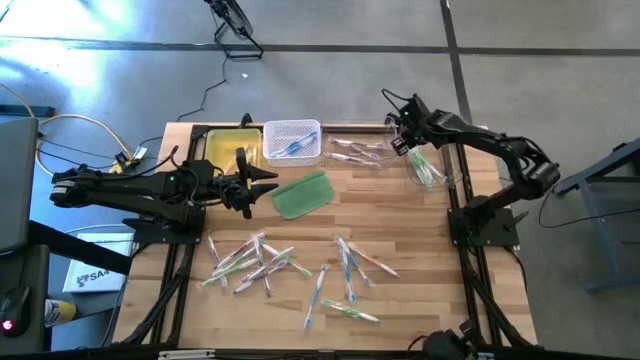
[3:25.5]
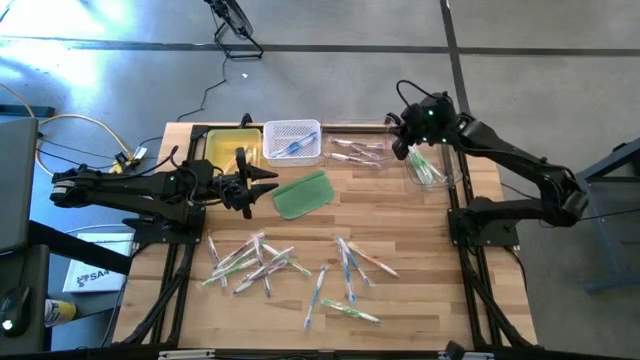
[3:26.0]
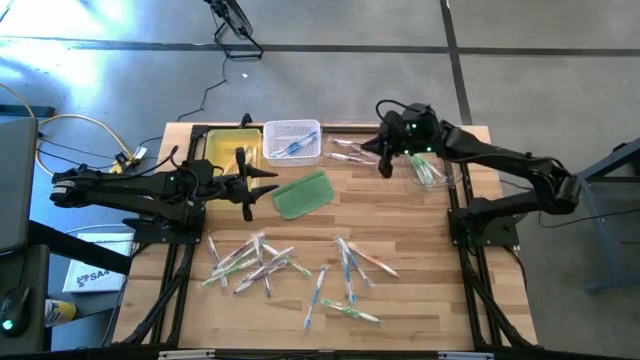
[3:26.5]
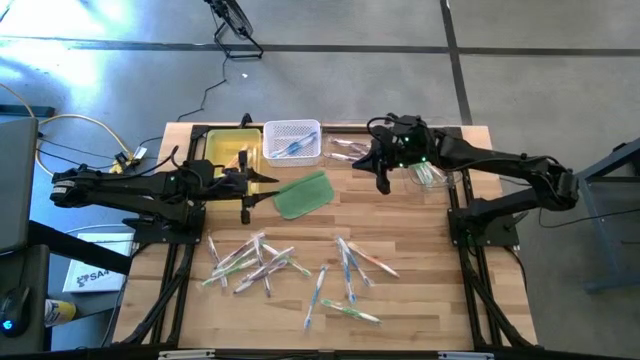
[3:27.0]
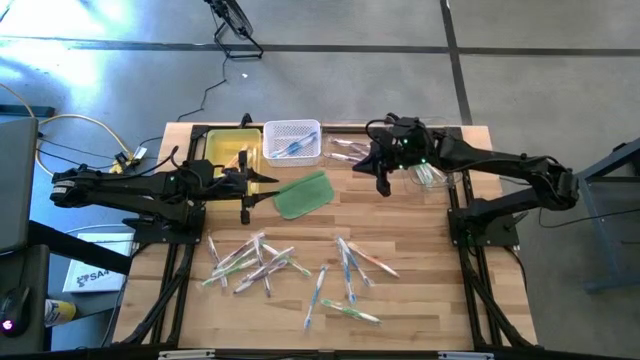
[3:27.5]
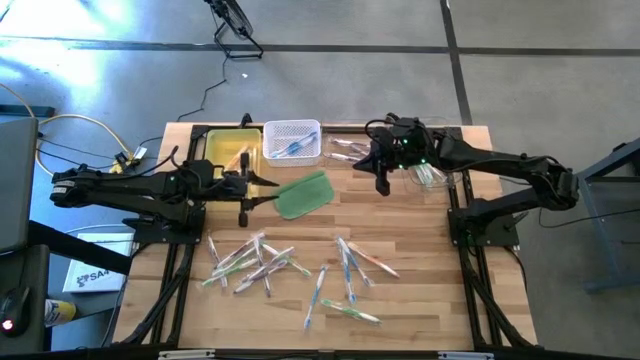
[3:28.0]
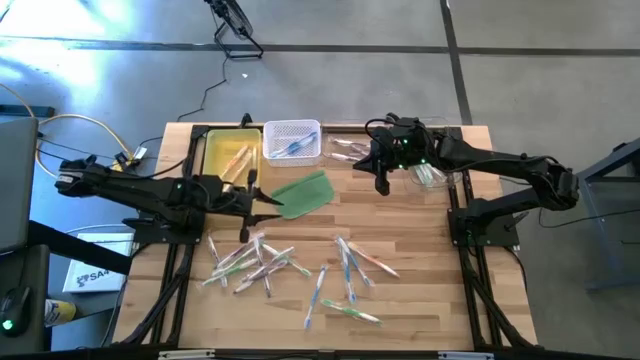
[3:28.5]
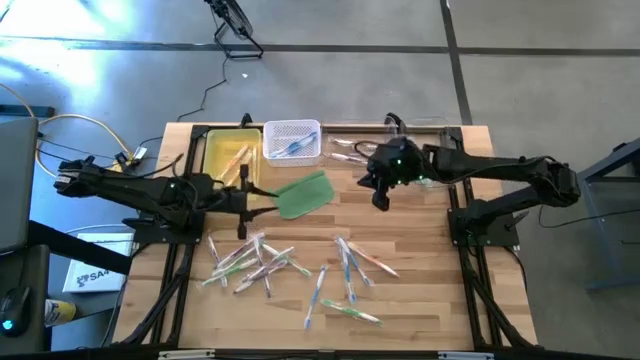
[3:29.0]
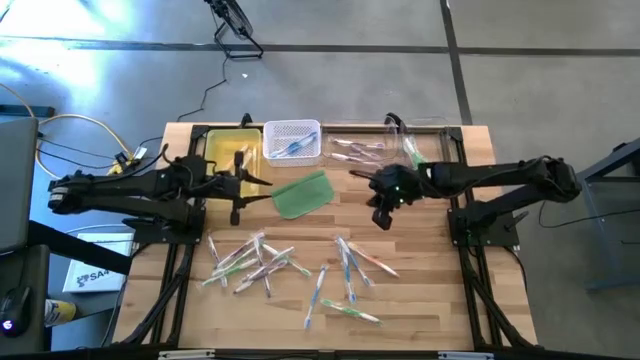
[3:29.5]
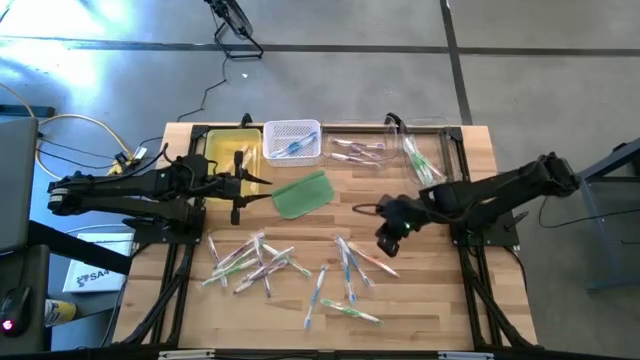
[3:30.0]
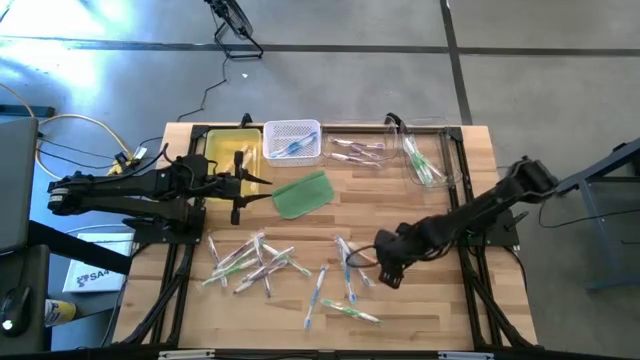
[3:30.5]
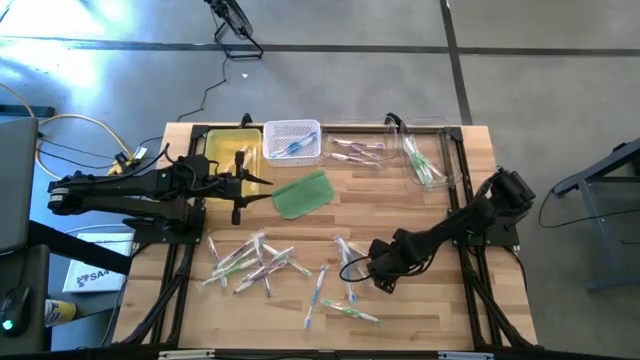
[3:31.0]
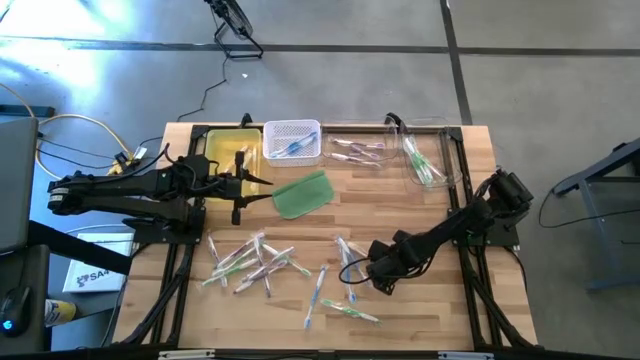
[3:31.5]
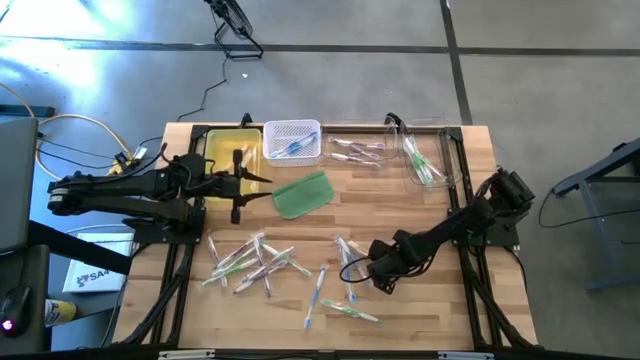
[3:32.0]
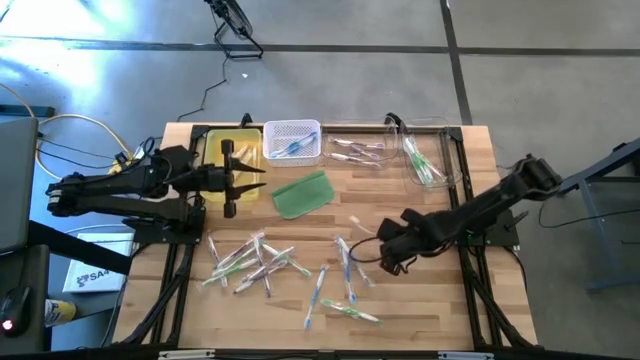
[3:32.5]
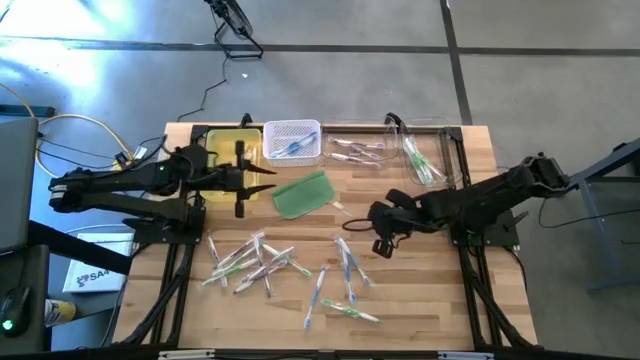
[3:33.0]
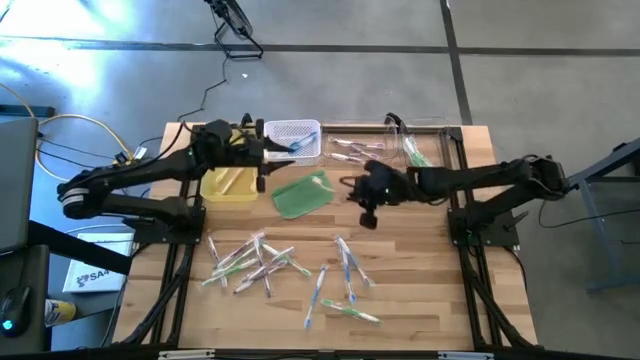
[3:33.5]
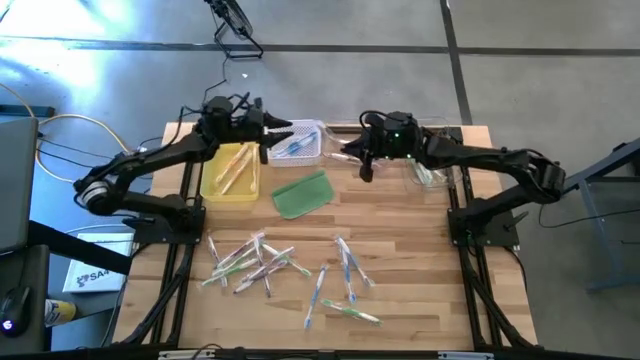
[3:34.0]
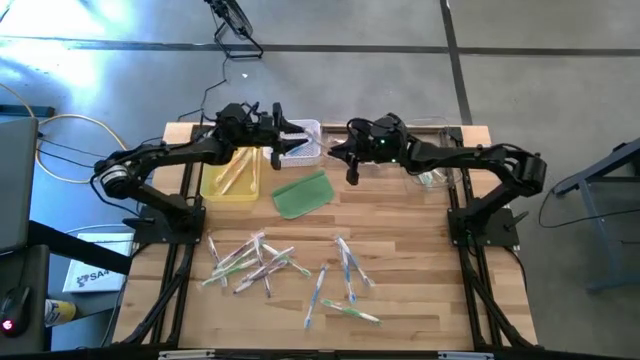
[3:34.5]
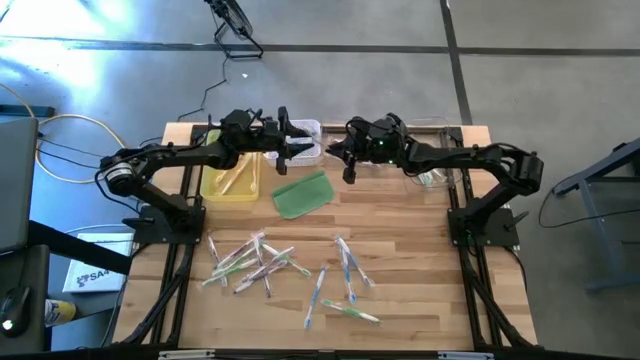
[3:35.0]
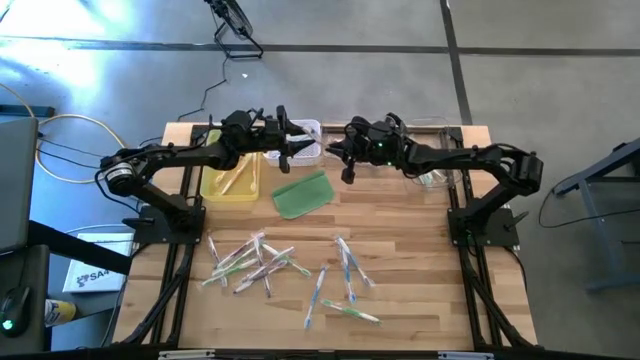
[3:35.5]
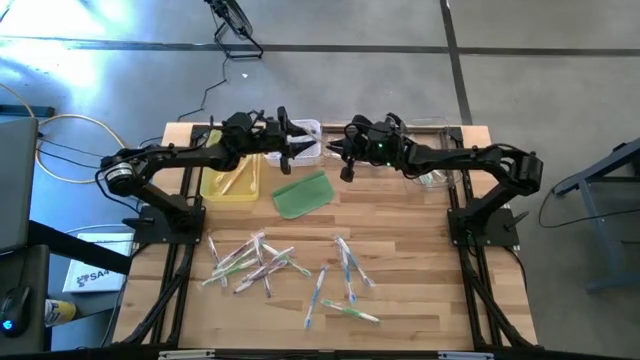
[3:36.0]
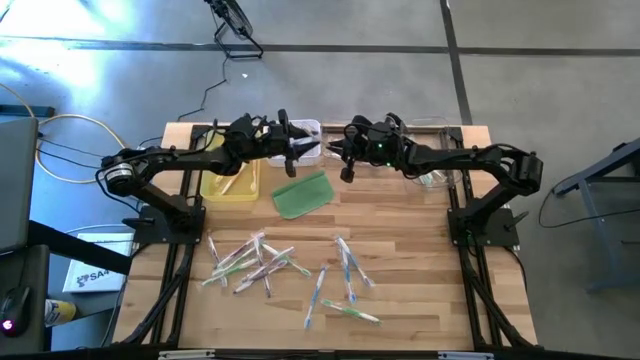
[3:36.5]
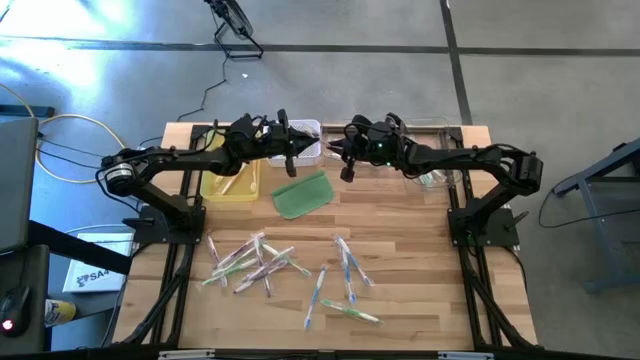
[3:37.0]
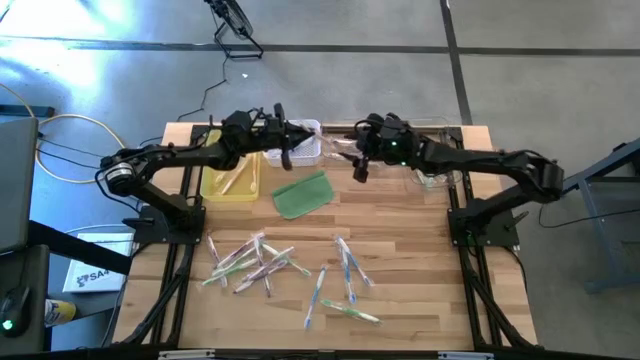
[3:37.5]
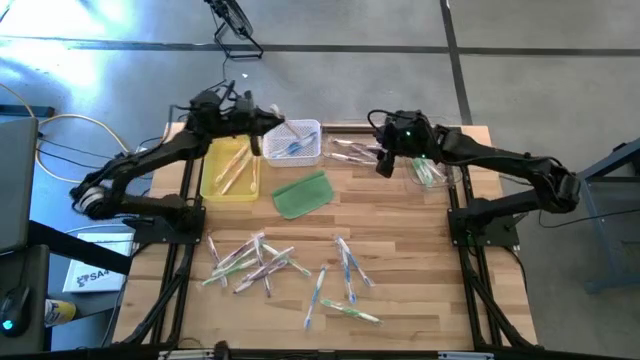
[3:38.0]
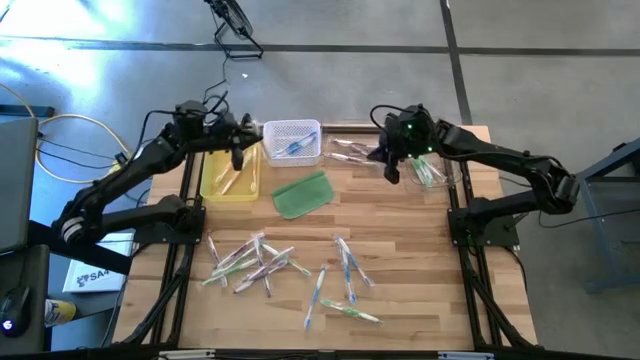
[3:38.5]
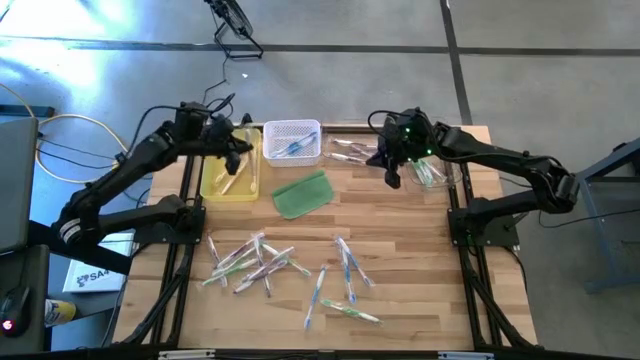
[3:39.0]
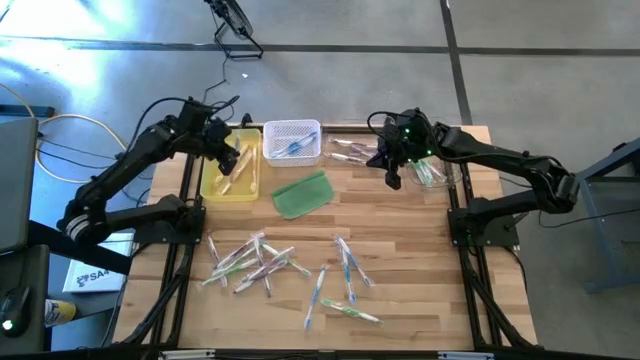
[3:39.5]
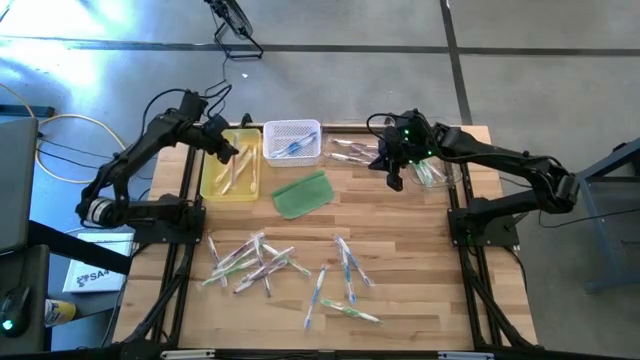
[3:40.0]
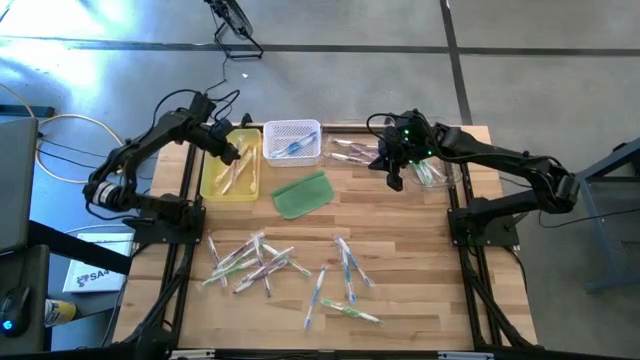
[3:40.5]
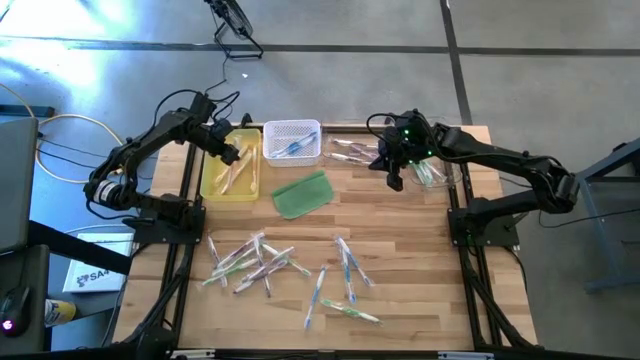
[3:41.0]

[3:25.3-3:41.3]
Task: Pick & Place Toothbrushes
Put the orange toothbrush into the yellow bin

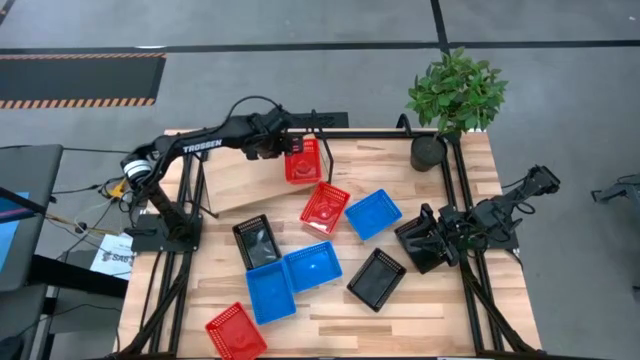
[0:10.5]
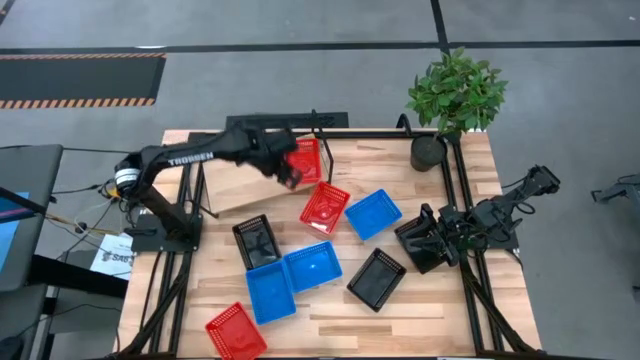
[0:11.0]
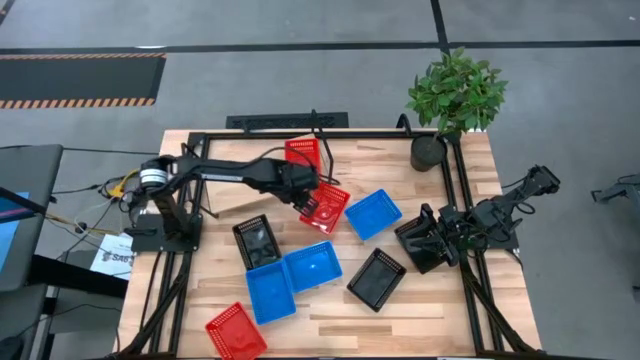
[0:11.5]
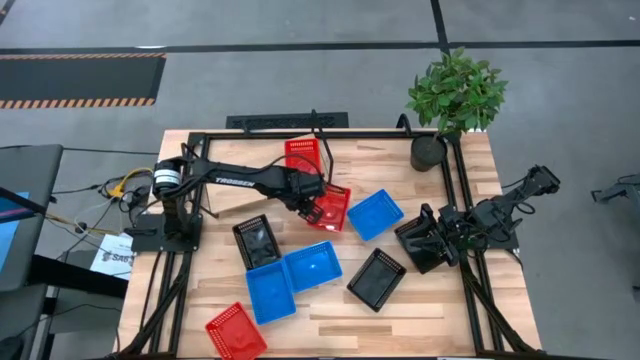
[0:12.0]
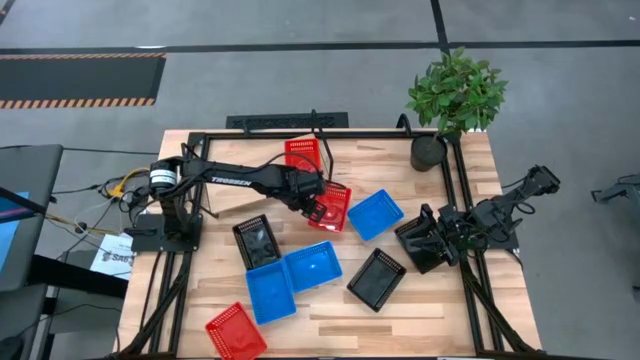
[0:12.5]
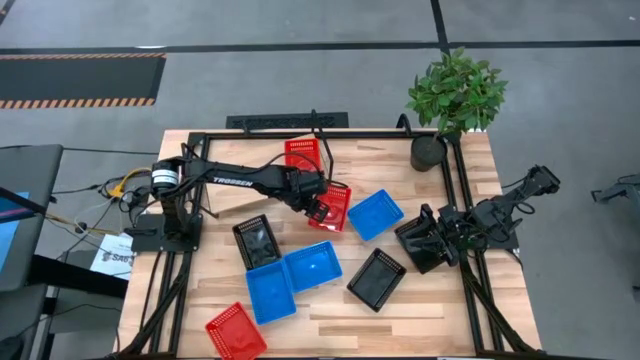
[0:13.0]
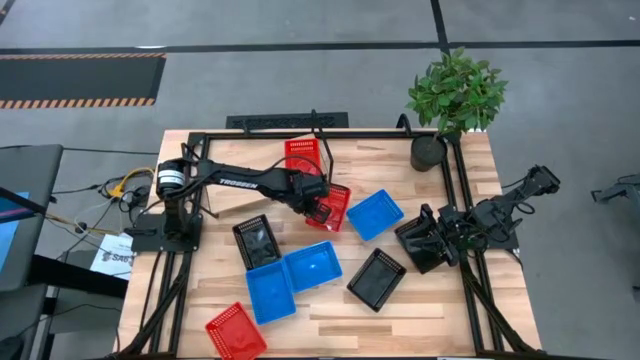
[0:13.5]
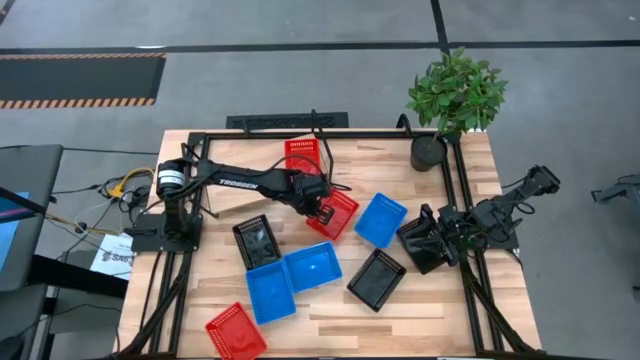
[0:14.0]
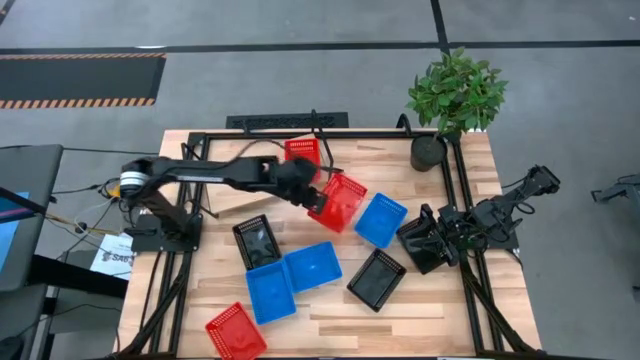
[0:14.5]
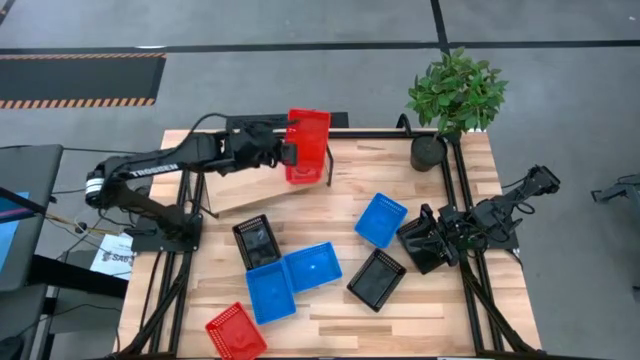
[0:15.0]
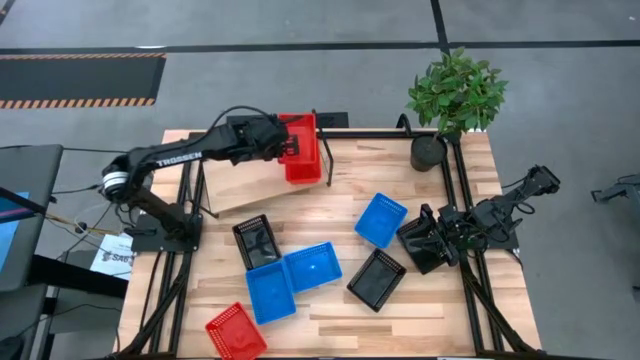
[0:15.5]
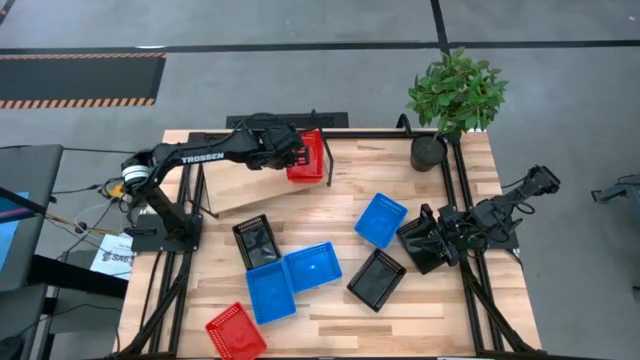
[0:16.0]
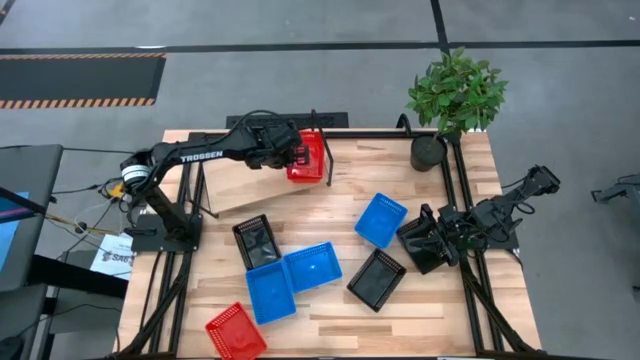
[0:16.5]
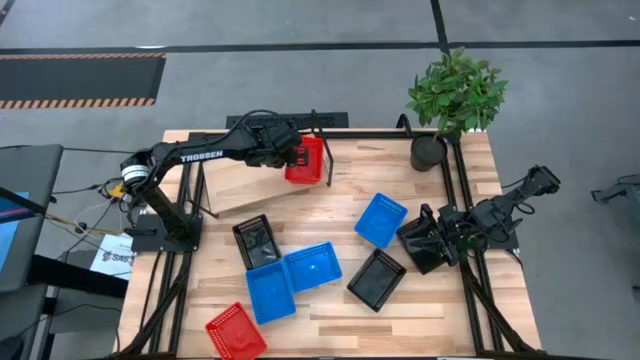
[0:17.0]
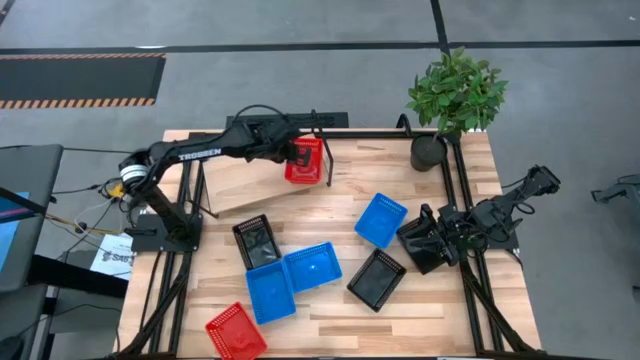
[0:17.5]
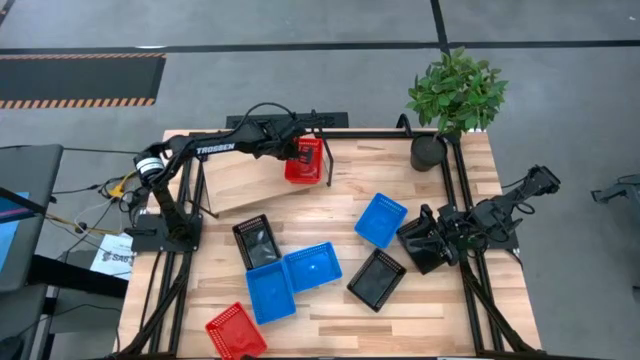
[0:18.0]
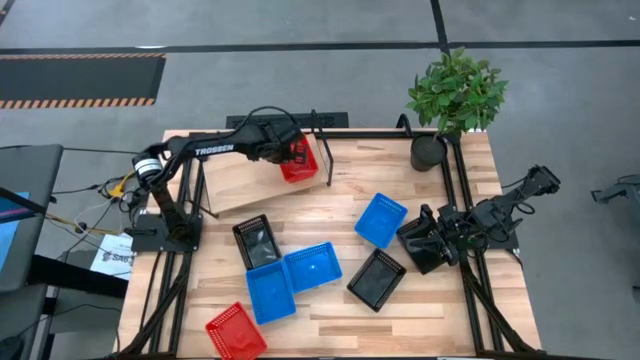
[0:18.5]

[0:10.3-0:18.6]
Task: Stack baskets on shelf by color
Stack the top red bin on top of the red bin on the shelf
